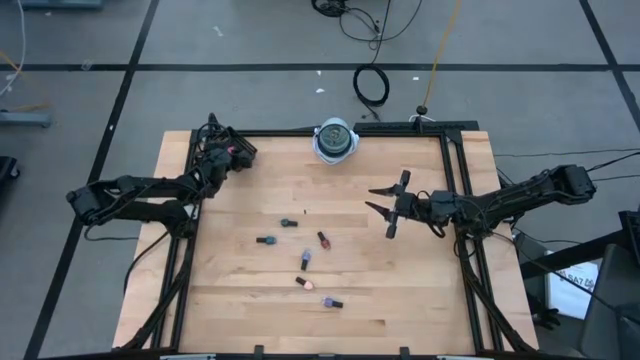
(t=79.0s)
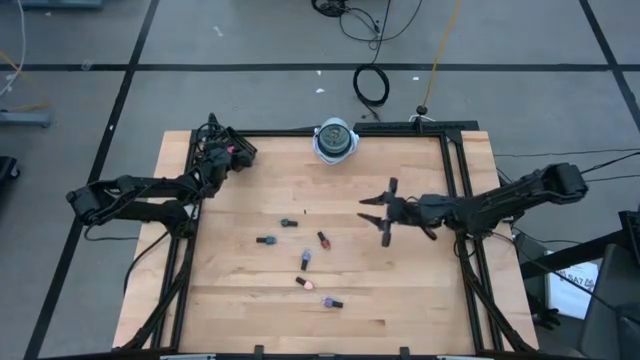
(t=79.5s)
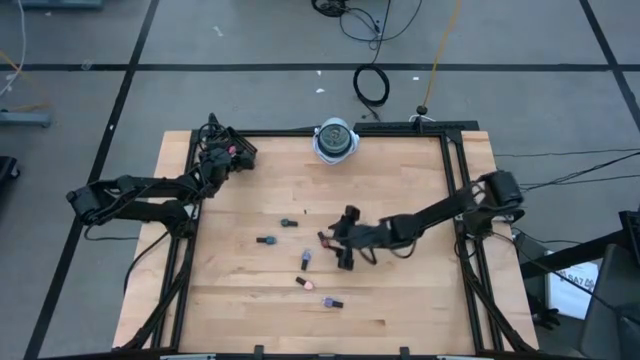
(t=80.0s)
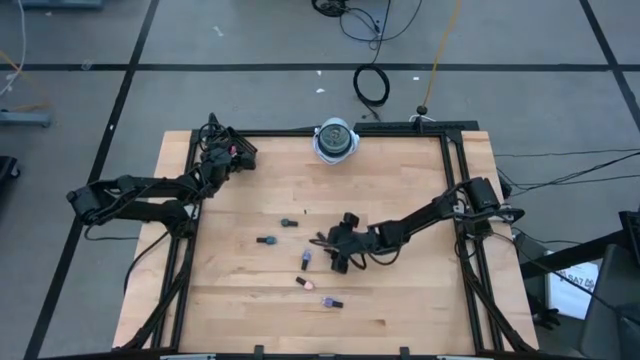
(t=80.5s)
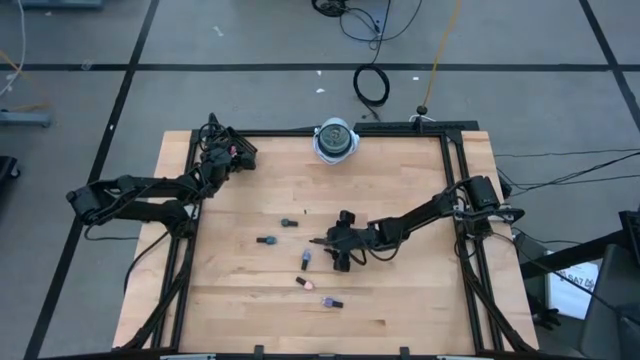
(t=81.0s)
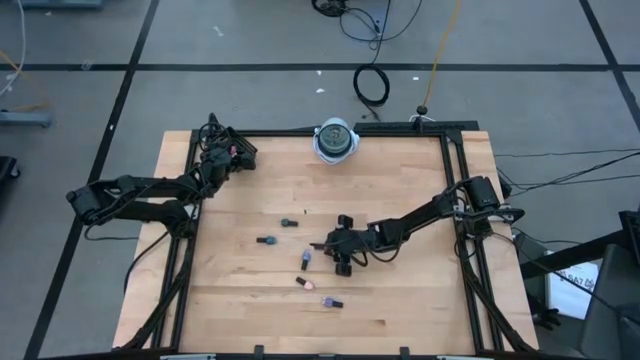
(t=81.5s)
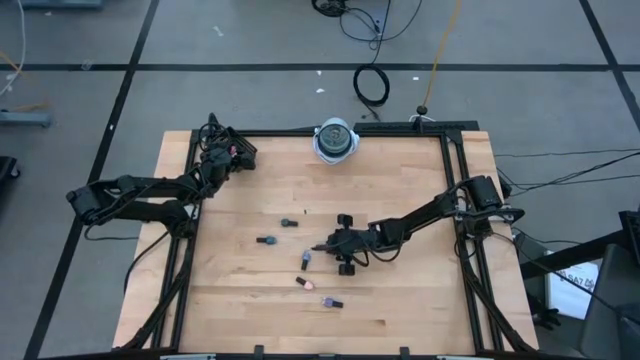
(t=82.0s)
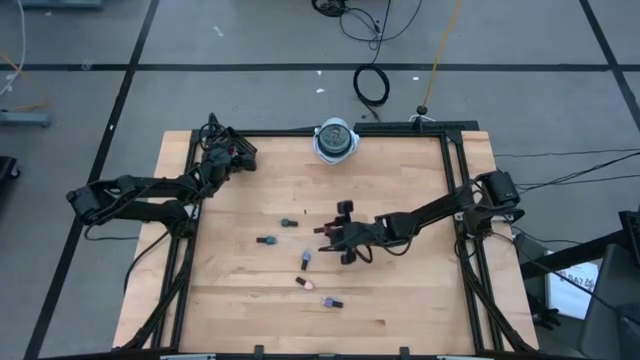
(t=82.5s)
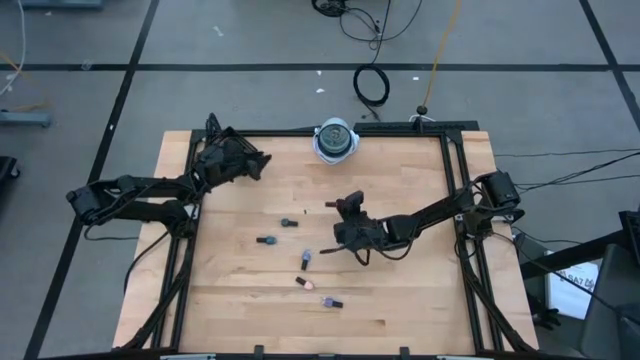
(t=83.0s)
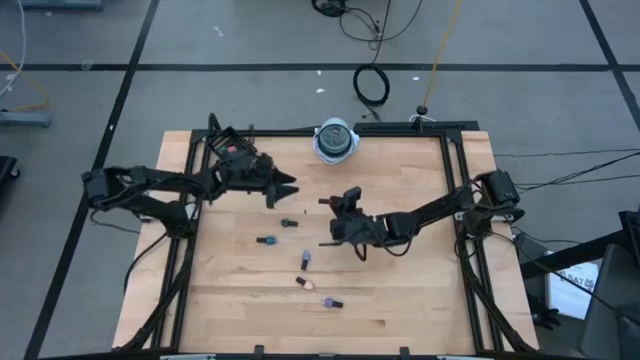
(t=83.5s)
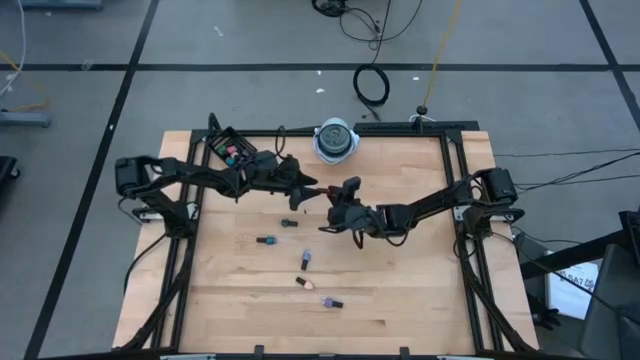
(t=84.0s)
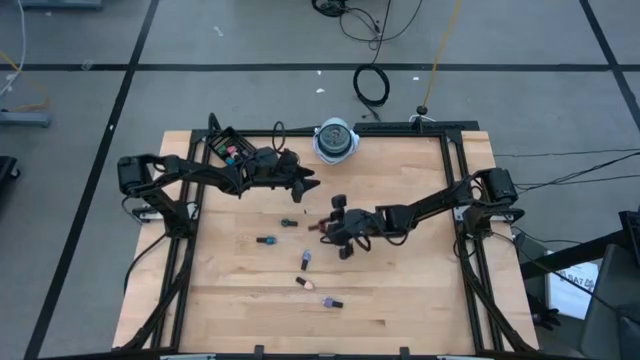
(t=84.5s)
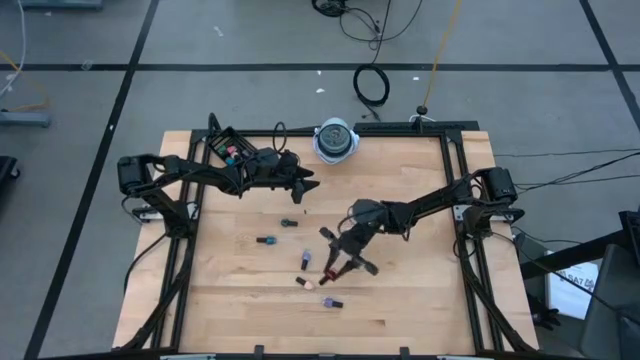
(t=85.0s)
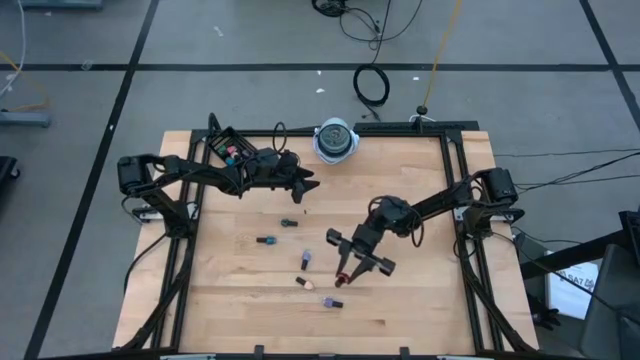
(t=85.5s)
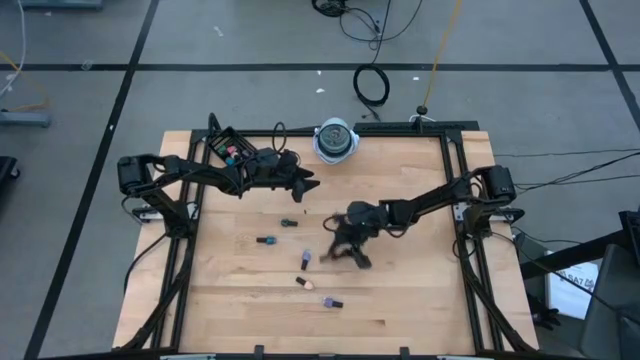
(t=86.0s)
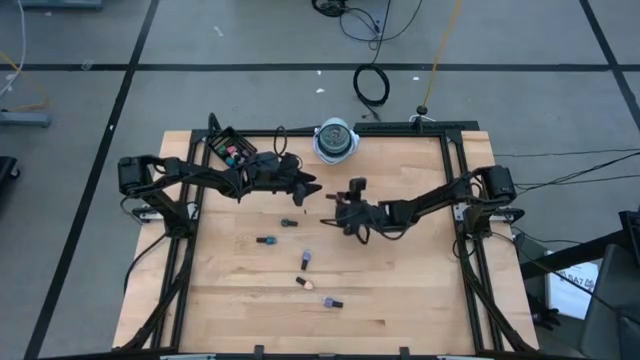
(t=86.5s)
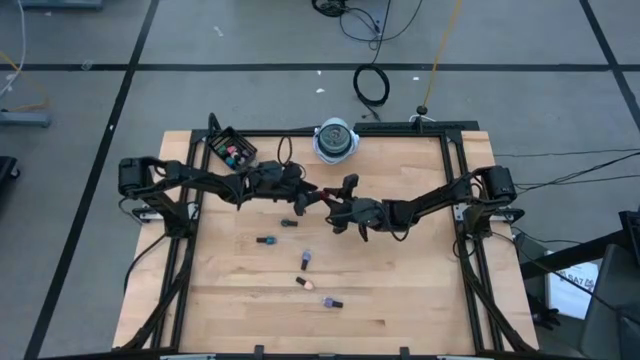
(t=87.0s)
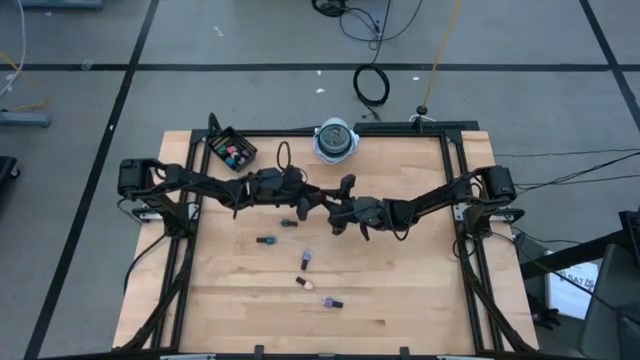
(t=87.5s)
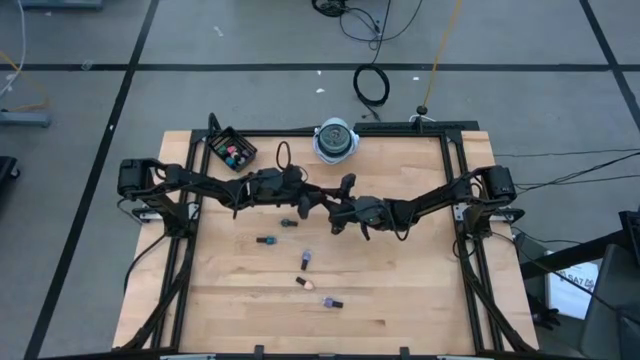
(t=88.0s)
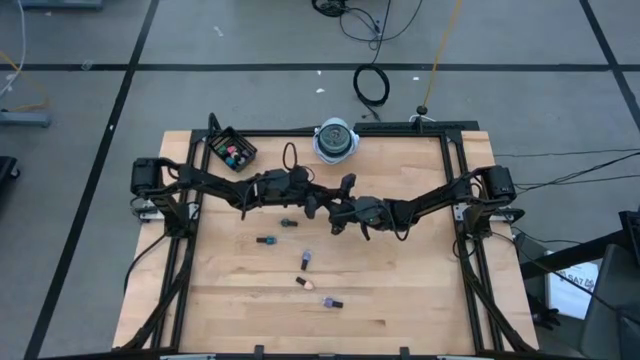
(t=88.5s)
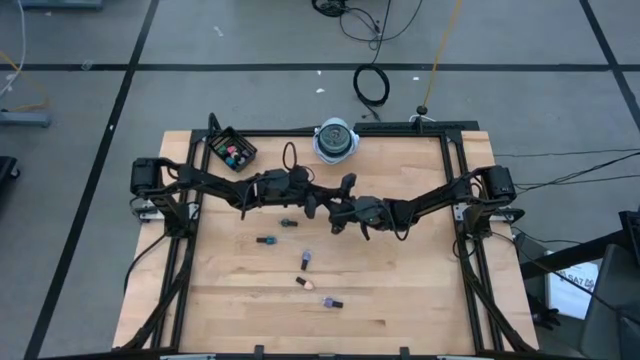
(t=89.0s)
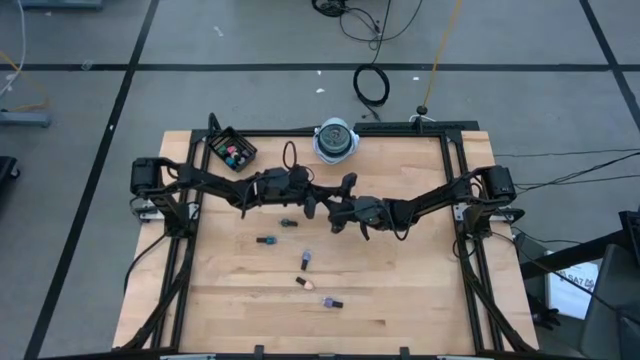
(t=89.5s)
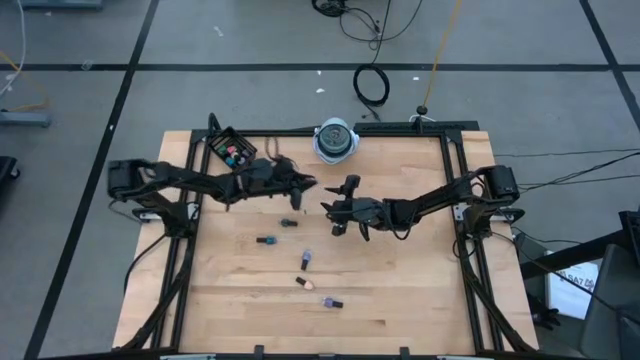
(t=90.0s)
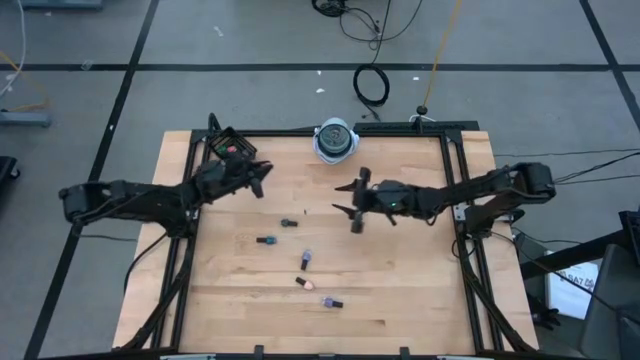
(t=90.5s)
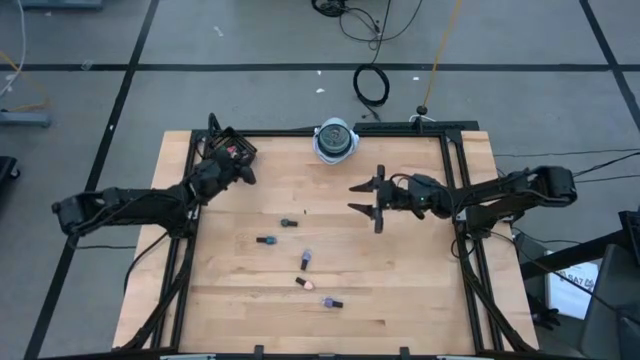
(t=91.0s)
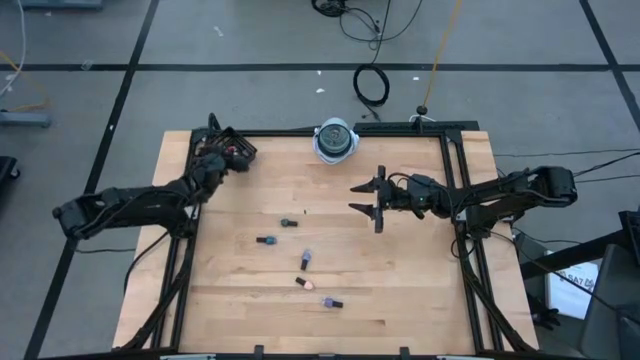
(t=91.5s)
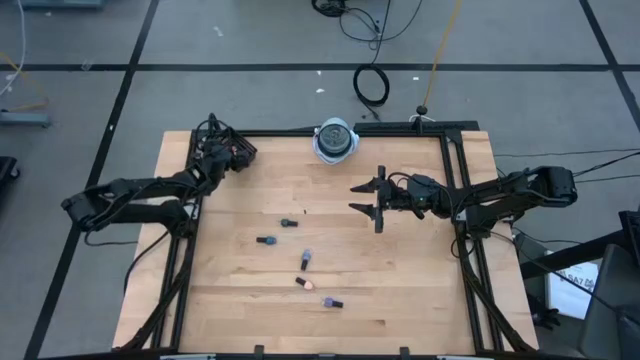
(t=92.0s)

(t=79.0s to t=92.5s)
Task: Pick & Place Nail Polish
Put the red nail polish bottle into the black bin
